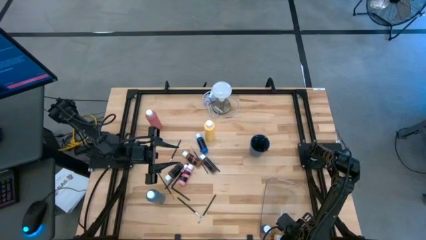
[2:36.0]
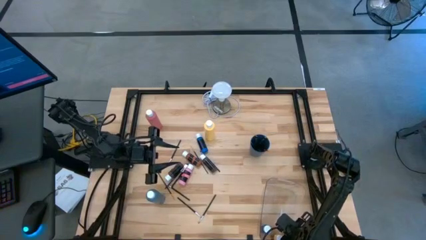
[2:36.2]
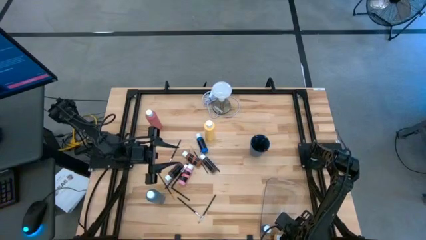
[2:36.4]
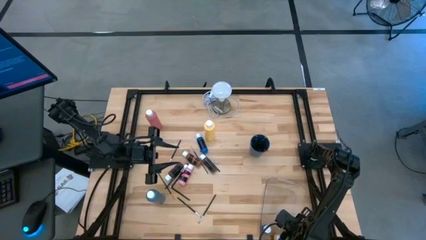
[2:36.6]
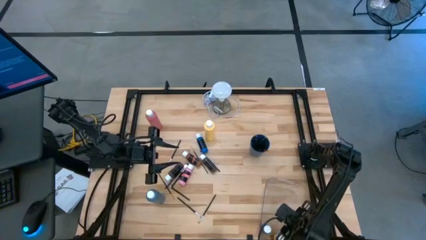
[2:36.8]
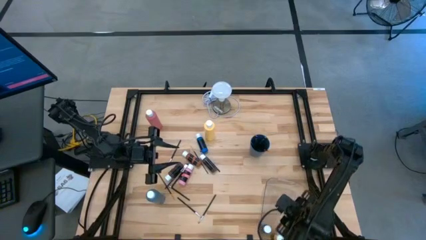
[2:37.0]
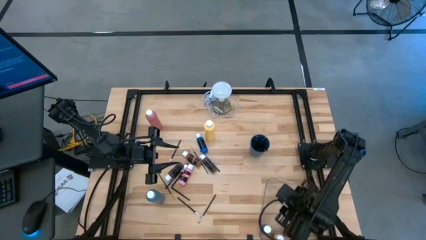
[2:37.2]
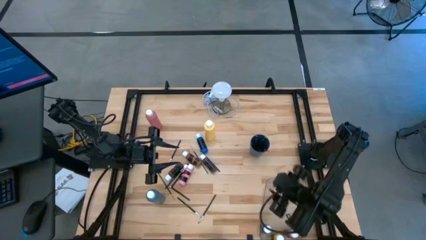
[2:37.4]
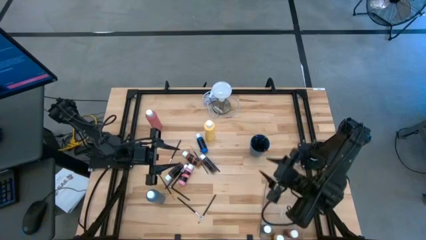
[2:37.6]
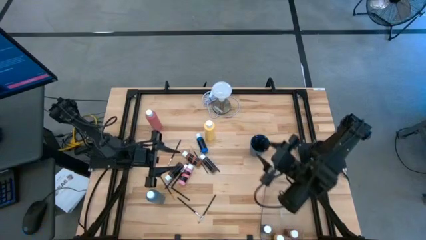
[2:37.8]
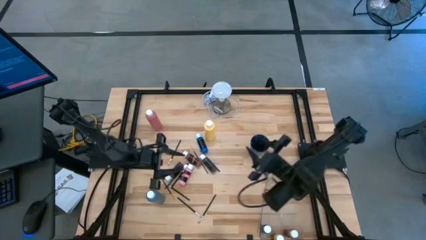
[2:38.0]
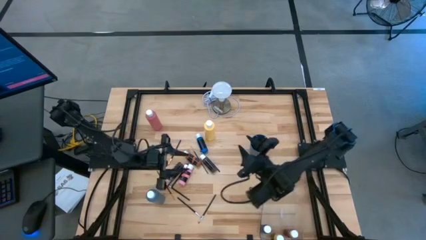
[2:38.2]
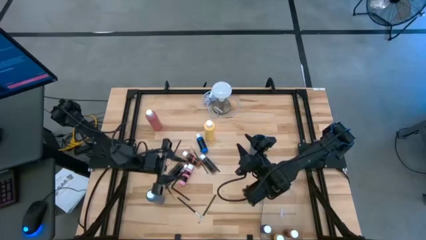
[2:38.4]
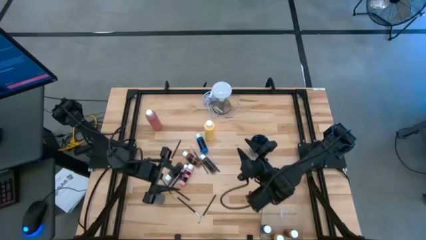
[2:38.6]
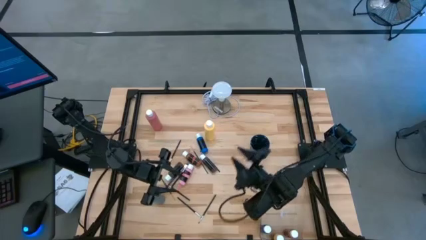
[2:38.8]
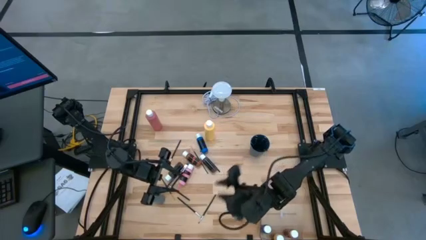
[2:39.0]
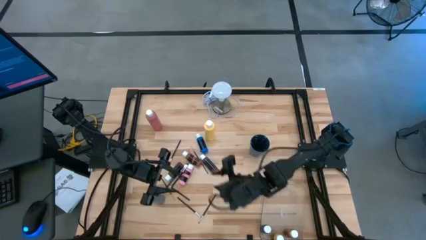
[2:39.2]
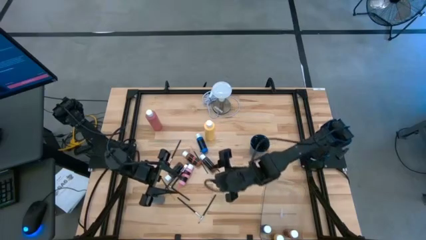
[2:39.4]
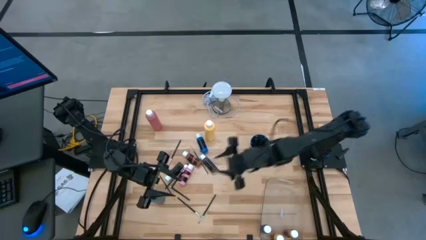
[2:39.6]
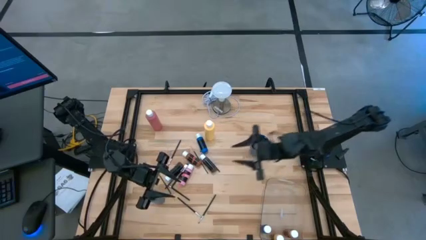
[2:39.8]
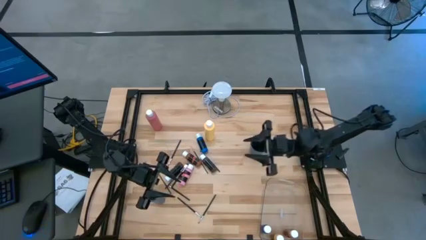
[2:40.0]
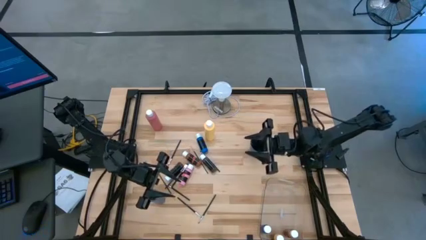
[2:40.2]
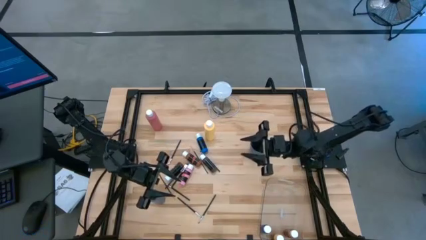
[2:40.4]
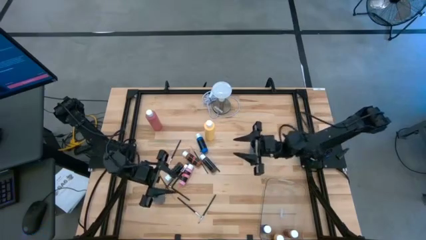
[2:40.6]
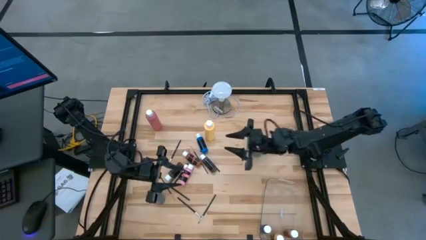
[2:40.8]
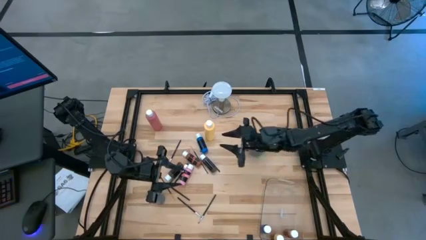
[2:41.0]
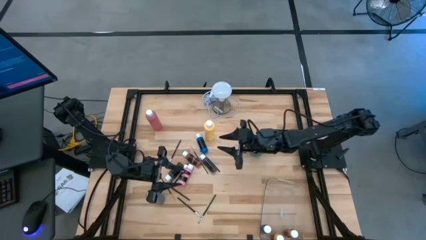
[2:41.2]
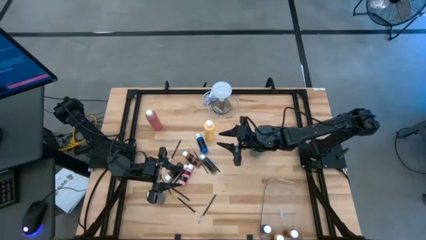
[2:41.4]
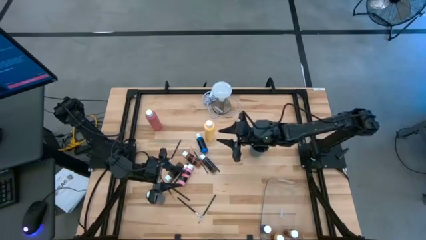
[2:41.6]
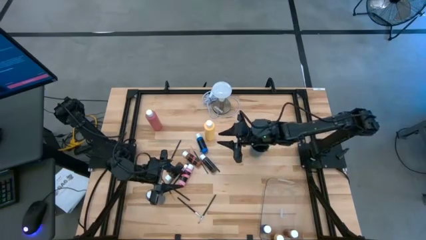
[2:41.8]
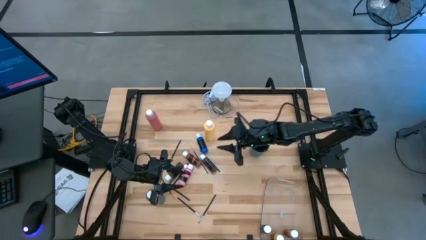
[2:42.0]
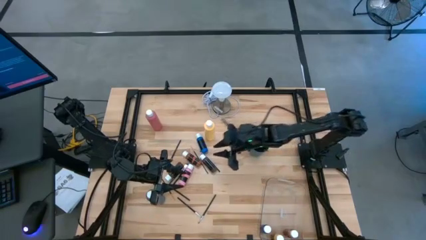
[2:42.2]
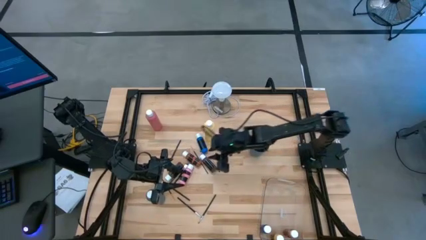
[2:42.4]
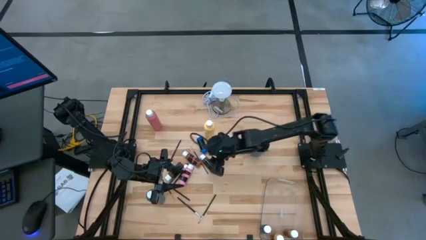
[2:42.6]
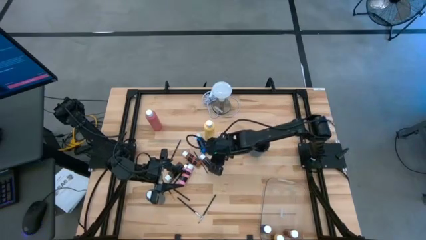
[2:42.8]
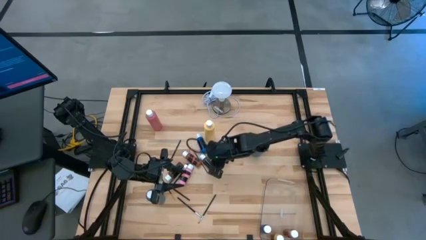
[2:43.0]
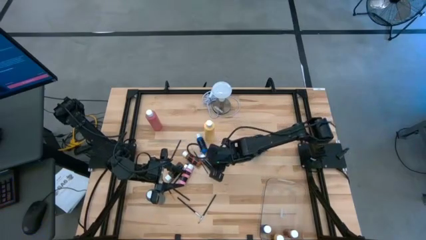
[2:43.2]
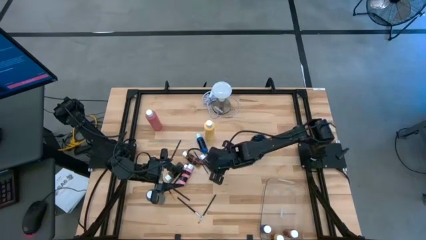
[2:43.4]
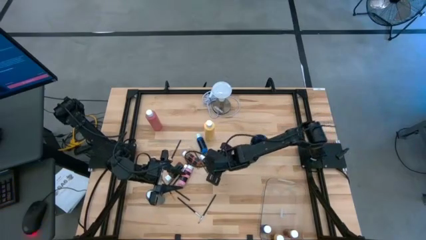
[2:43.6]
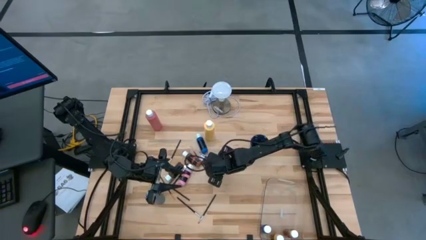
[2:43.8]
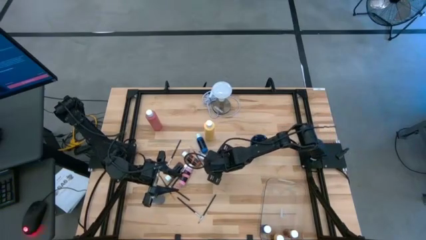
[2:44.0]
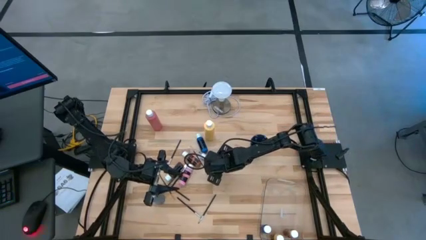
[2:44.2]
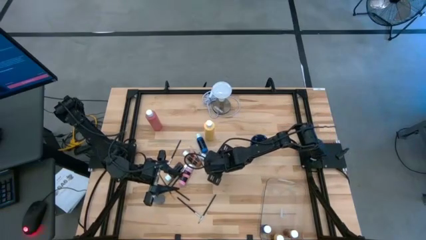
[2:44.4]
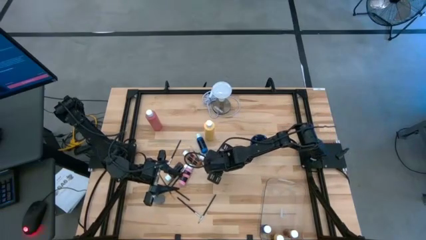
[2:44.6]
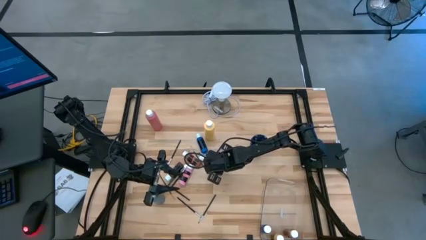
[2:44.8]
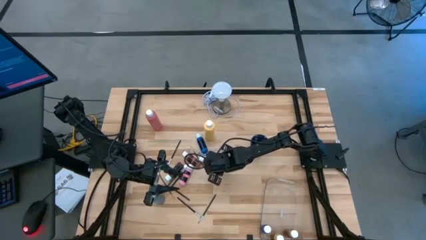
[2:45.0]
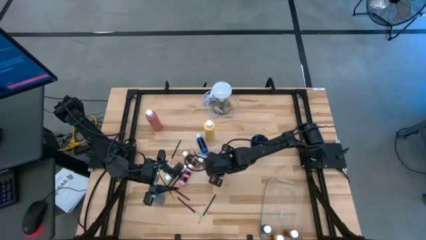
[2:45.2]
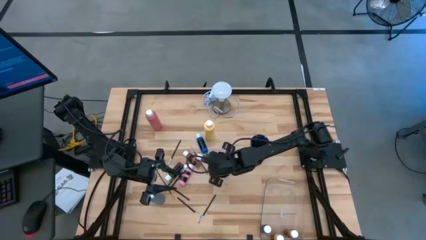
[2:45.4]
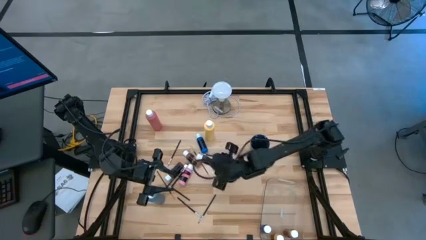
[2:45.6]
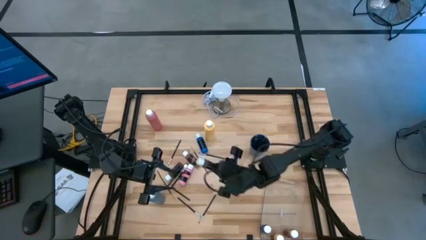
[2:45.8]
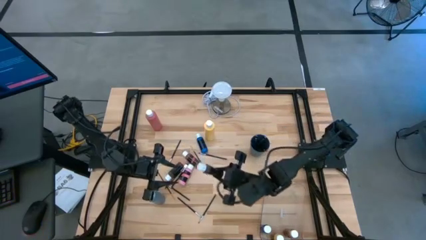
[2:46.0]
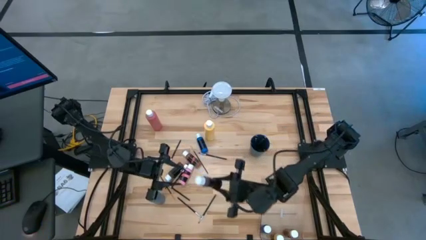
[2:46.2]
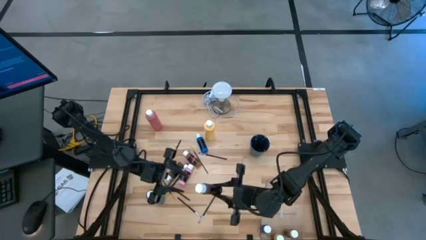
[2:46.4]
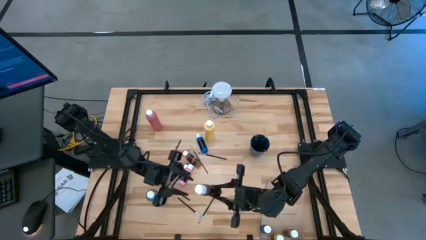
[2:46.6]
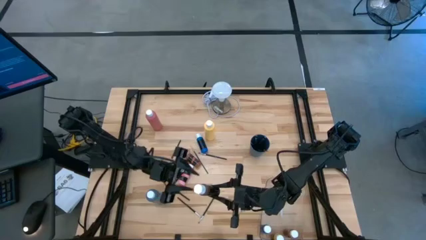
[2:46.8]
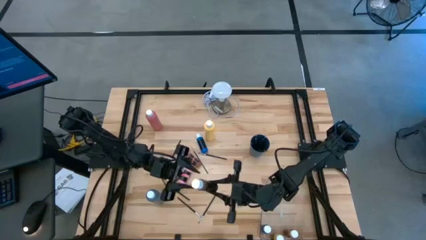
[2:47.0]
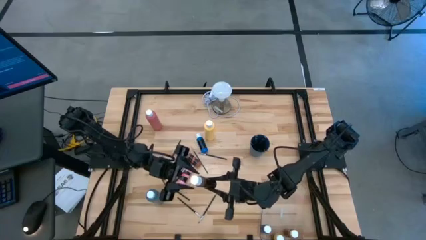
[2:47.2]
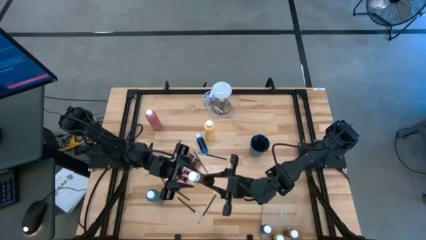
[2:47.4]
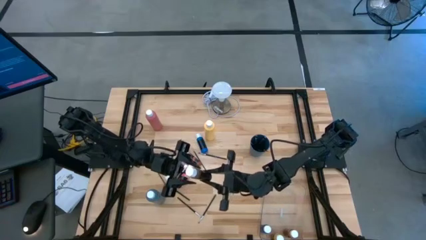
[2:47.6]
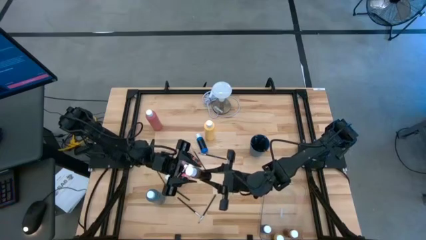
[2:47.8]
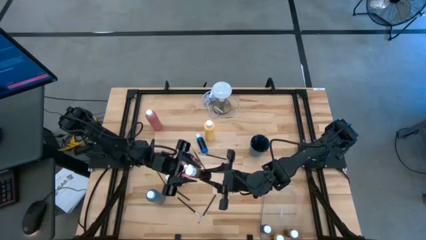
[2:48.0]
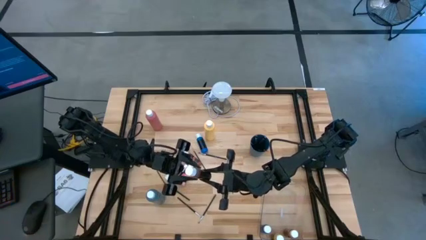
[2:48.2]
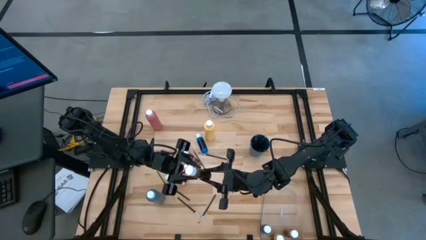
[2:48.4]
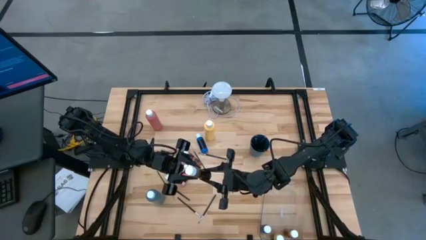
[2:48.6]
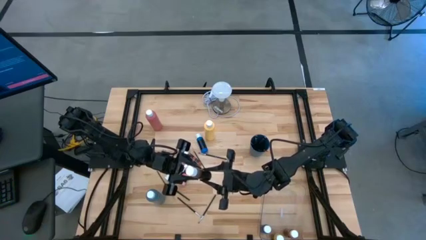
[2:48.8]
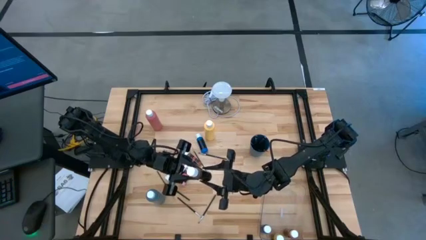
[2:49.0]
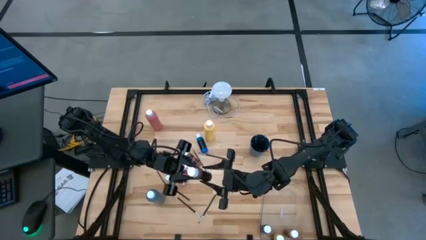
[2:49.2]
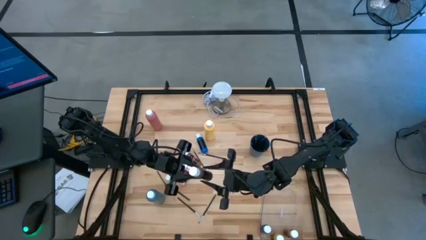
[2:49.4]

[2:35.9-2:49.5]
Task: Pick & Place Paint Supplies
Put the small dark green paint bottle into the transparent bin

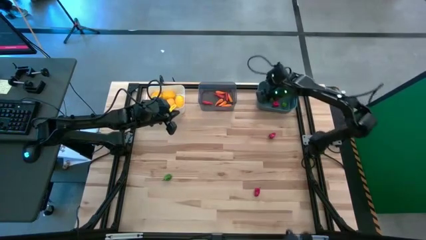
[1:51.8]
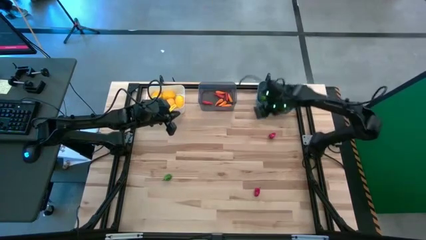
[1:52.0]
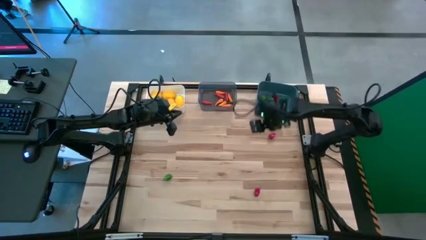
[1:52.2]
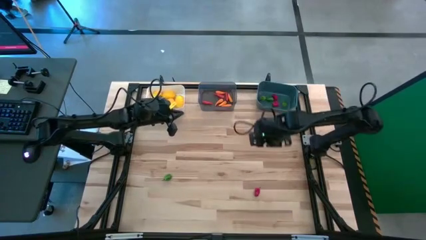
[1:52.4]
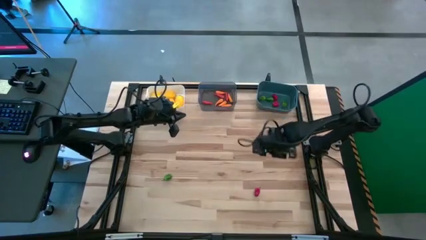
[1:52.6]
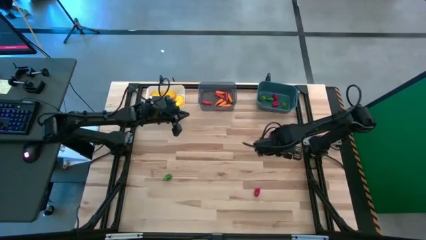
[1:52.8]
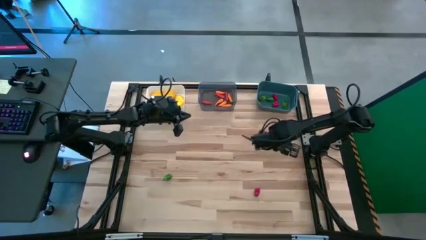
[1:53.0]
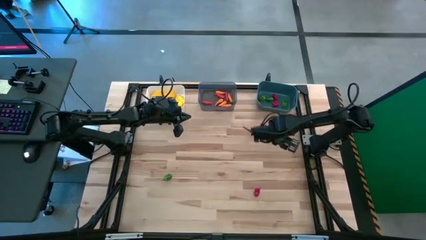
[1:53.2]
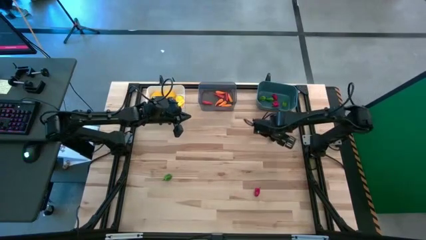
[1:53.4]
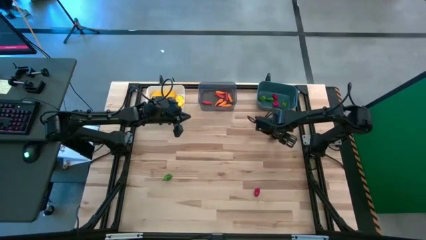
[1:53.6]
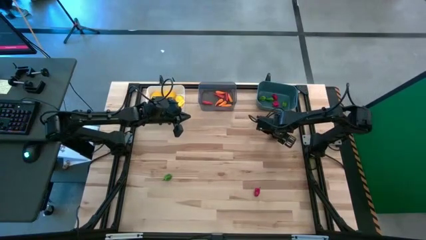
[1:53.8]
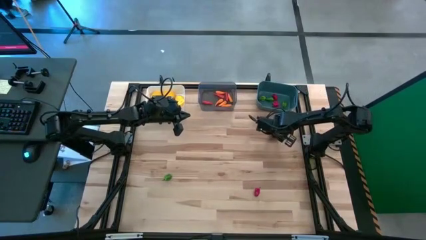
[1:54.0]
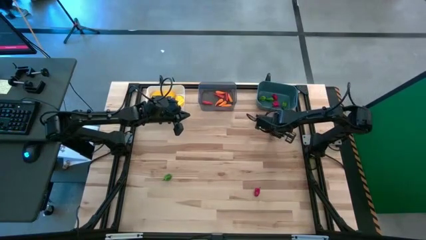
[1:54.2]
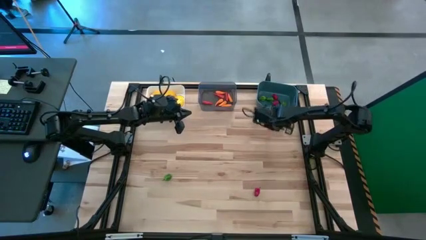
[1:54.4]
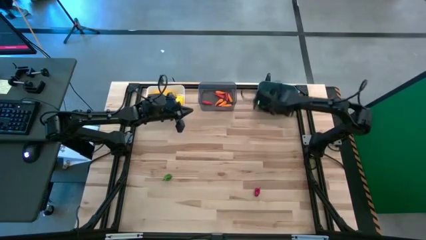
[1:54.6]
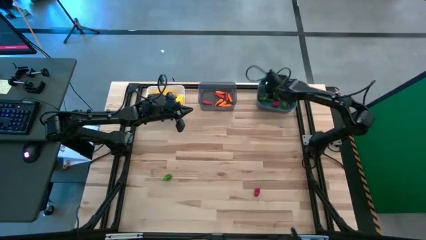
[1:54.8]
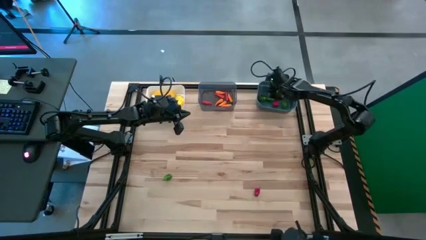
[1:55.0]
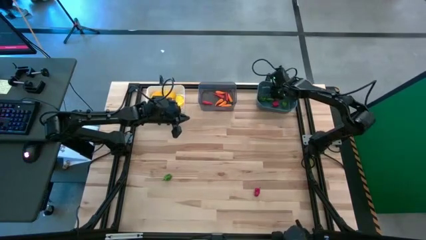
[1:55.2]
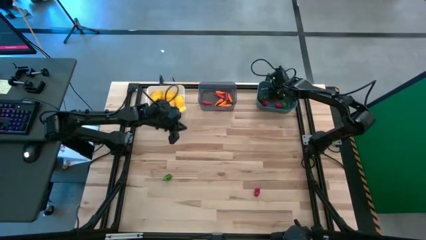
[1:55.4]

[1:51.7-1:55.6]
Task: Sort produce into baskets
Put the top red bell pepper into the blue bin

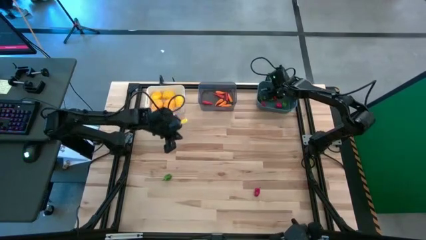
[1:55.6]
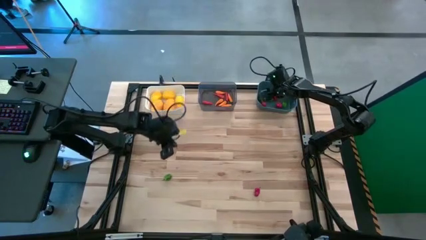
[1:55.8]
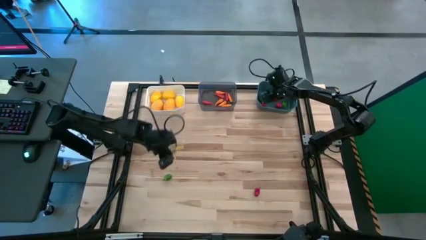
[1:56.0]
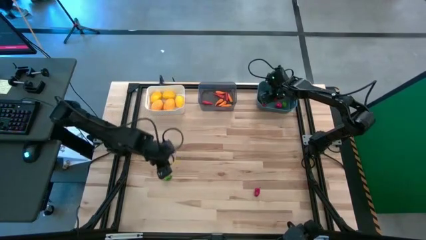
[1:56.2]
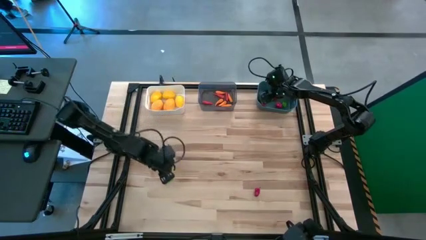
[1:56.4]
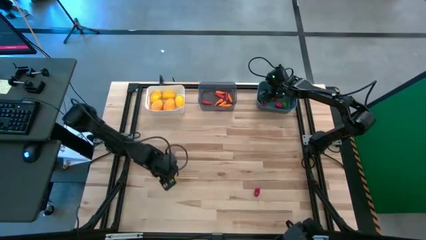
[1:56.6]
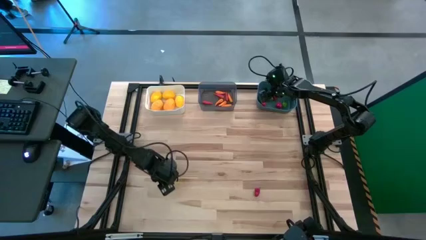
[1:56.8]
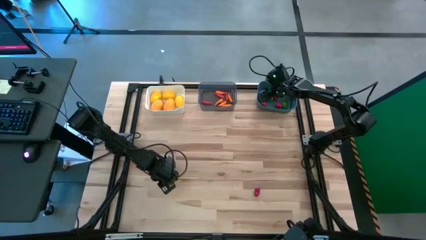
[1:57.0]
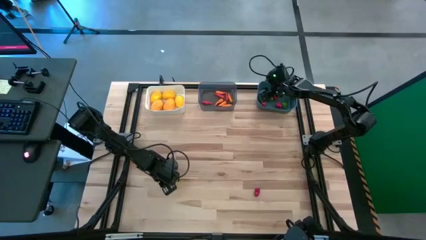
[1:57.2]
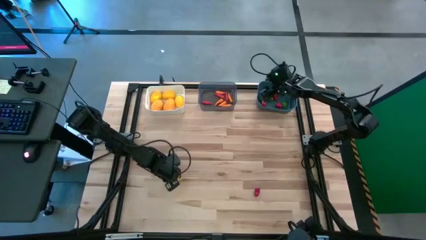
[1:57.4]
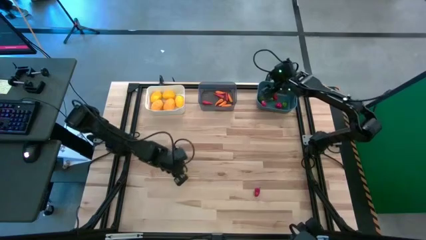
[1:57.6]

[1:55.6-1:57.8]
Put the green bell pepper into the blue bin
